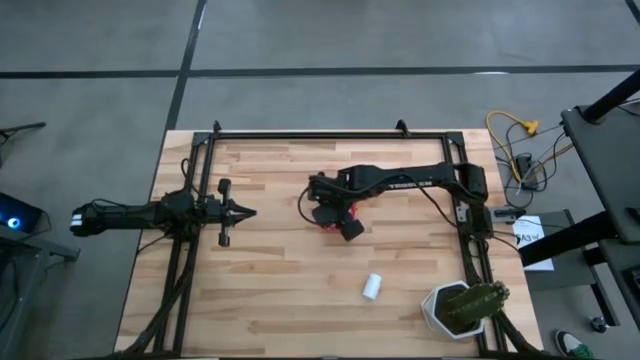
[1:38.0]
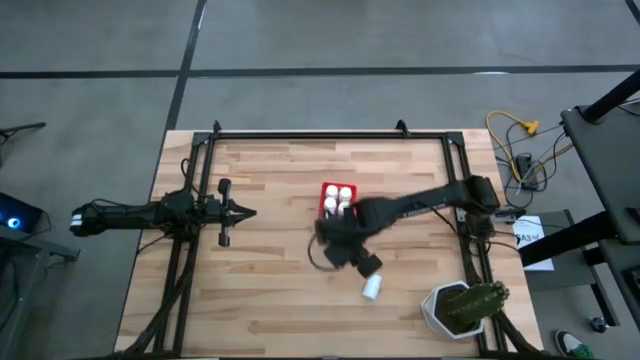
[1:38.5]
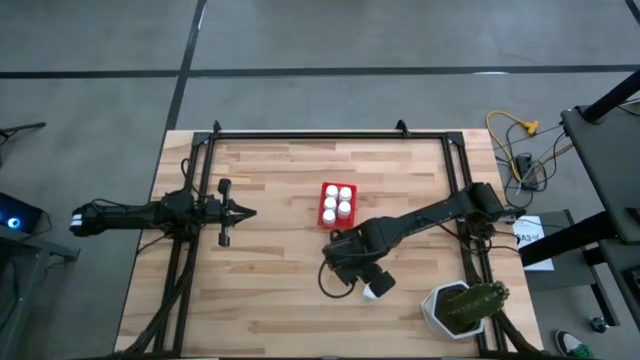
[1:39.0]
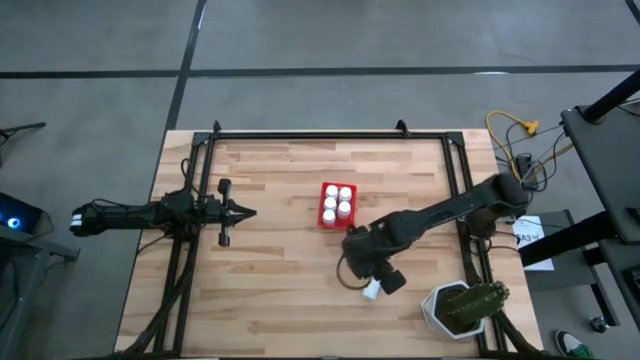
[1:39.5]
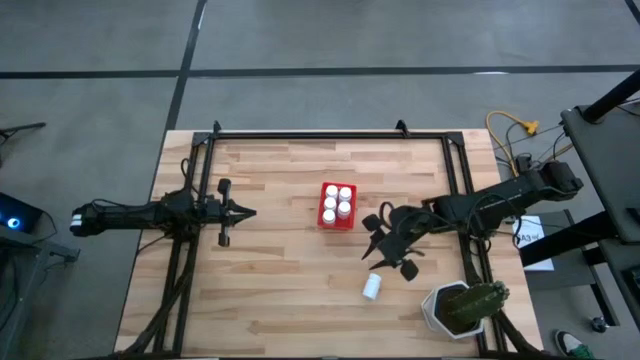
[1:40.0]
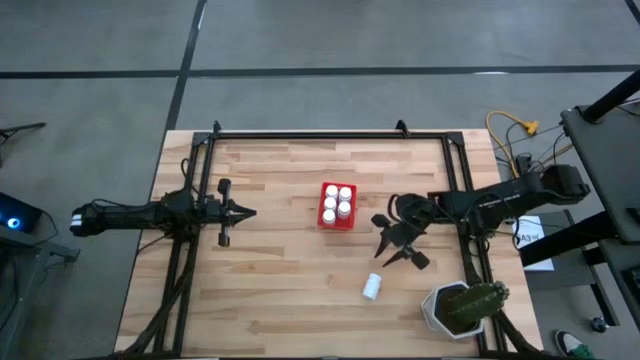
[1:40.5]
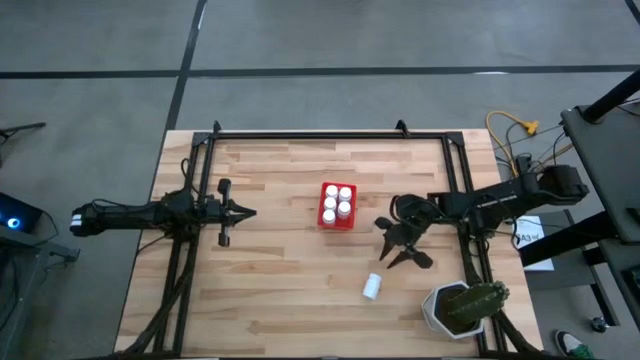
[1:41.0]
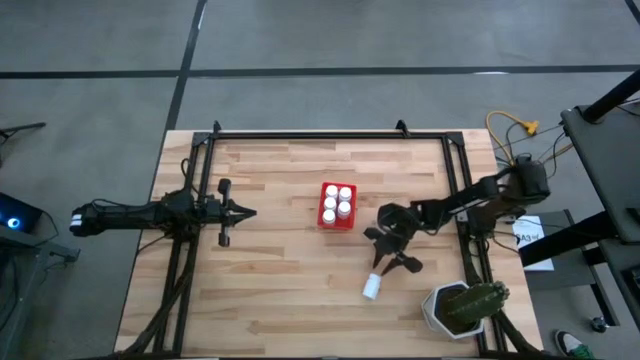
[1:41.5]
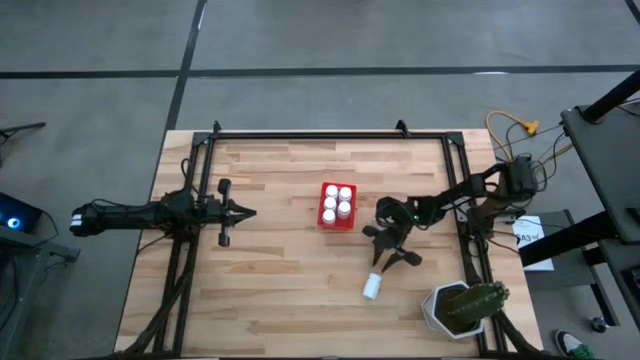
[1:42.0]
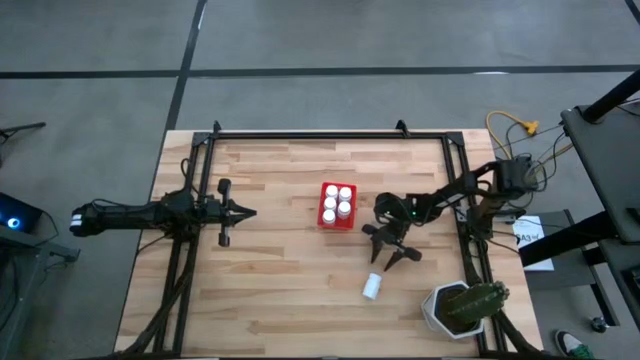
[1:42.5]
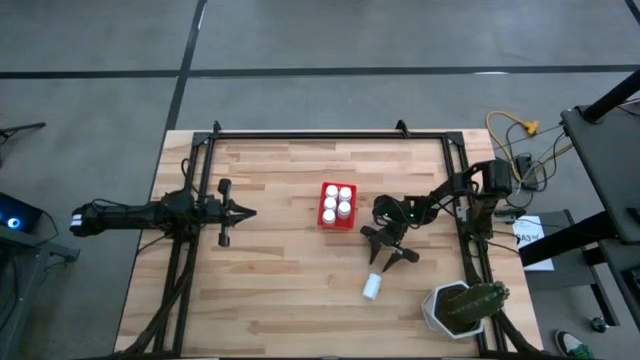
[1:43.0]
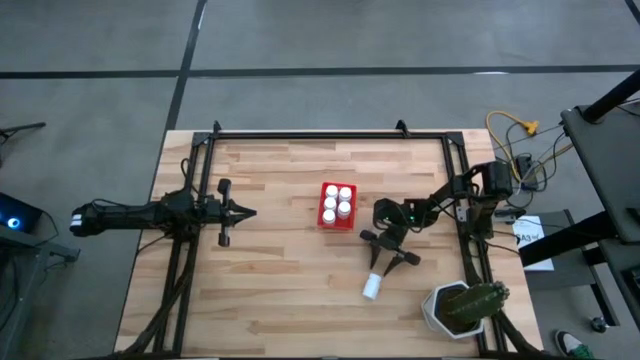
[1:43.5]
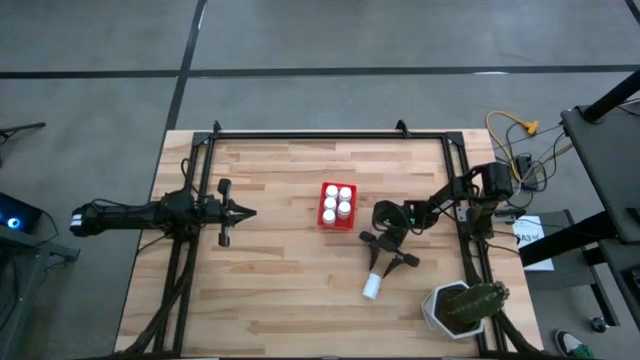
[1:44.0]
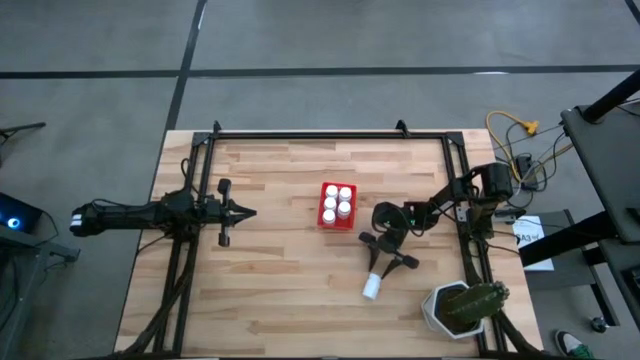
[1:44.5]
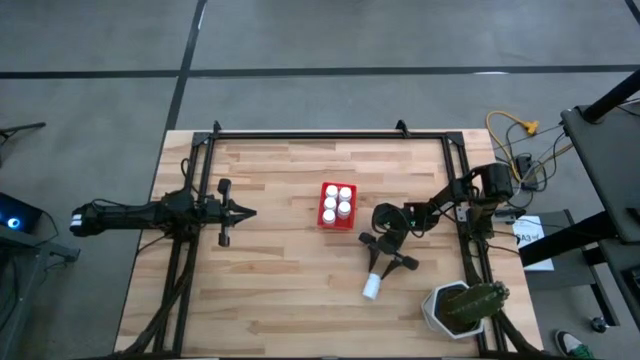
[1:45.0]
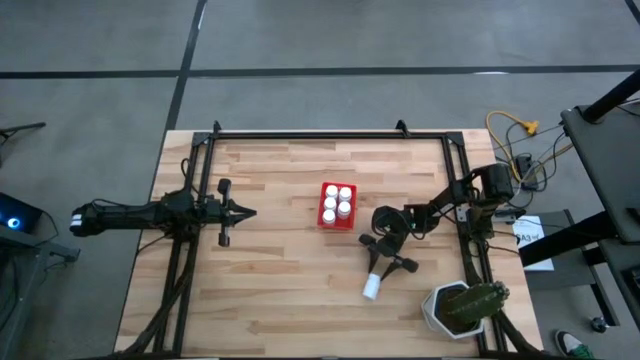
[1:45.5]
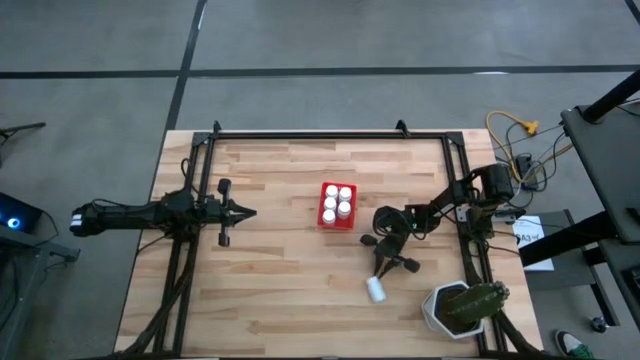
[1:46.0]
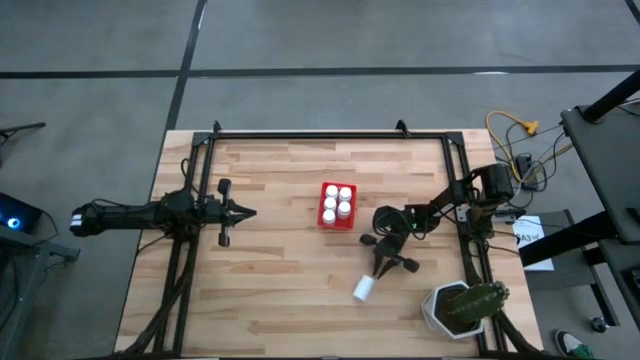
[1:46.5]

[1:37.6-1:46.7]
Task: Pick and place pill bottles into a basket
Put the white medicine bottle into the red bin

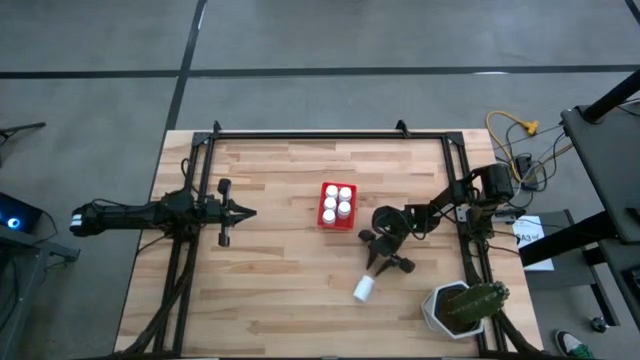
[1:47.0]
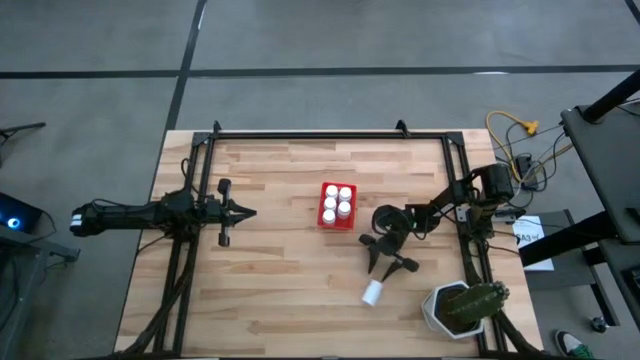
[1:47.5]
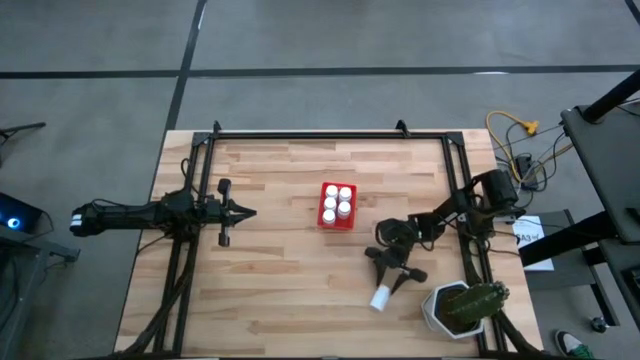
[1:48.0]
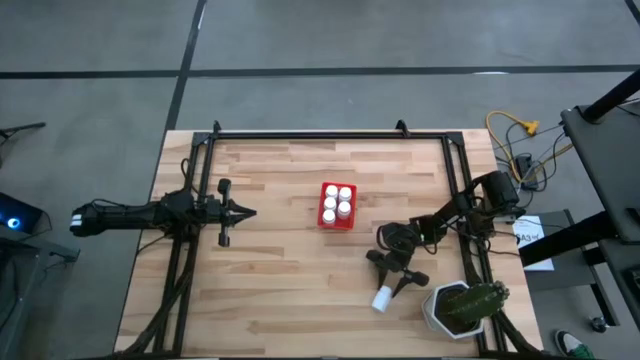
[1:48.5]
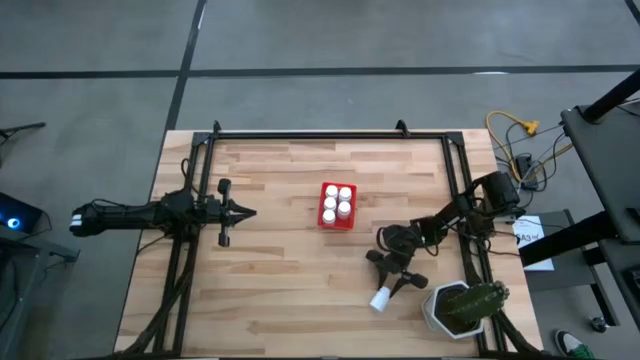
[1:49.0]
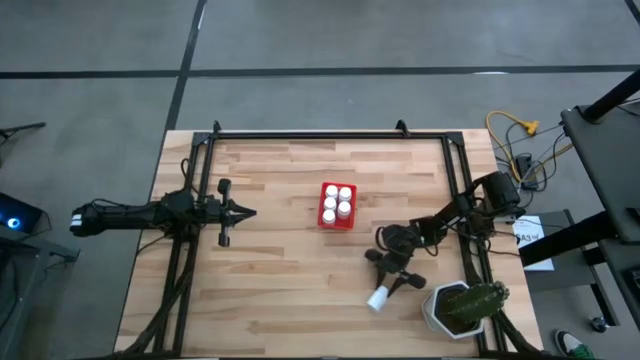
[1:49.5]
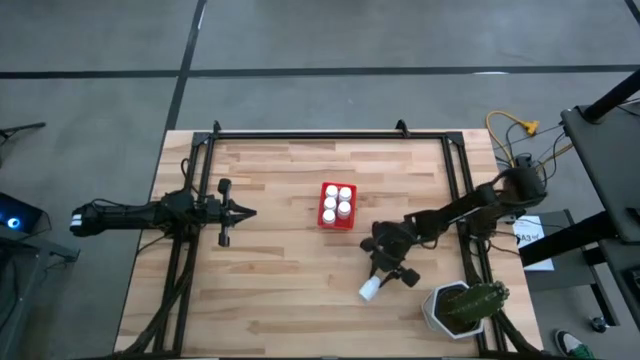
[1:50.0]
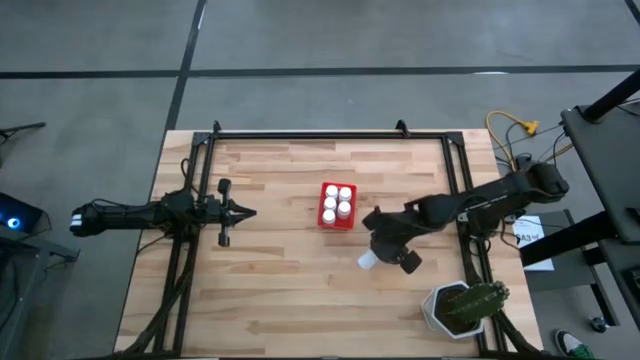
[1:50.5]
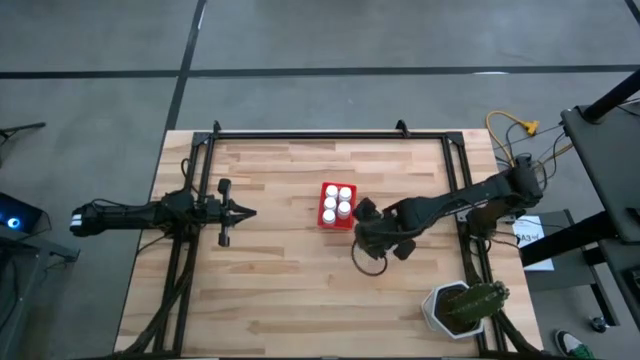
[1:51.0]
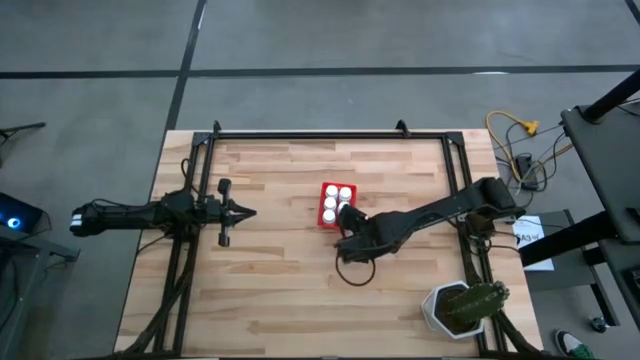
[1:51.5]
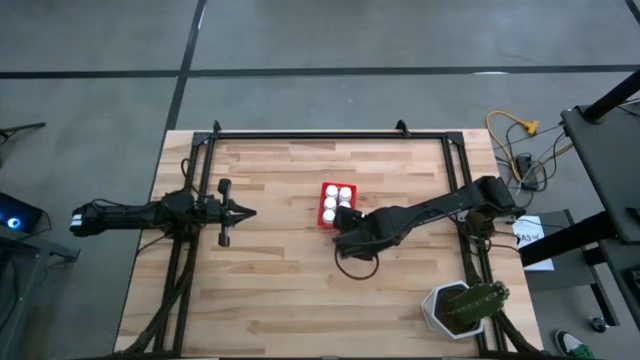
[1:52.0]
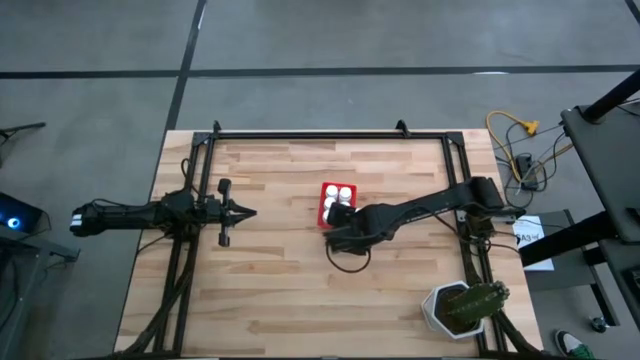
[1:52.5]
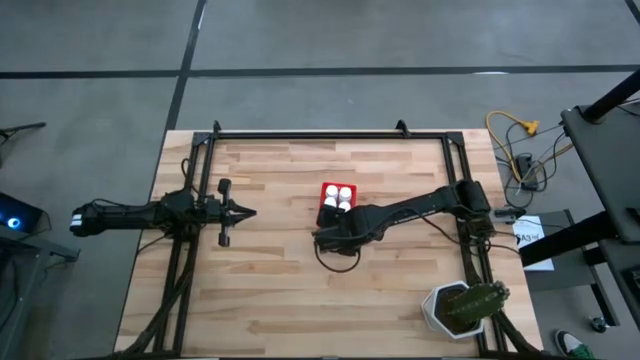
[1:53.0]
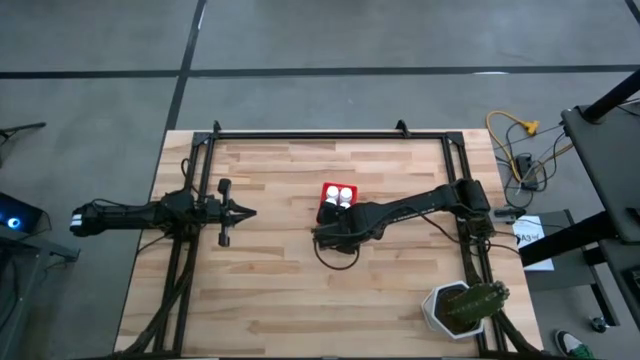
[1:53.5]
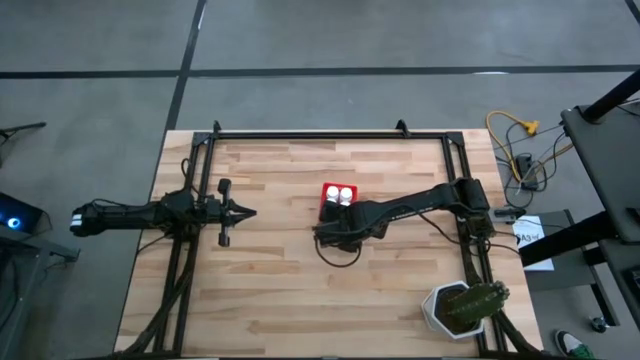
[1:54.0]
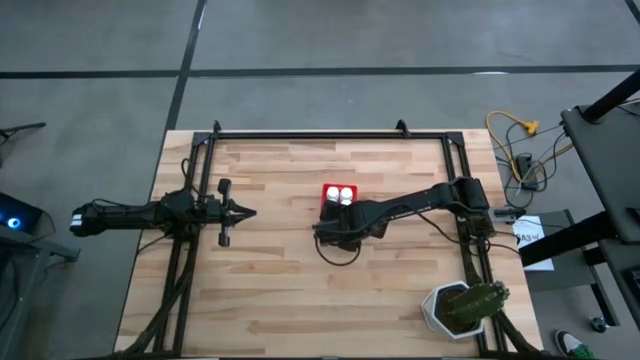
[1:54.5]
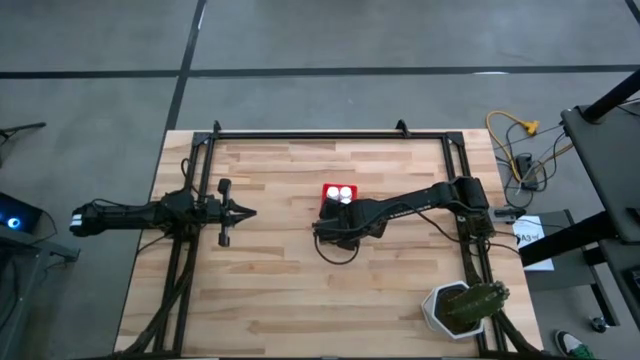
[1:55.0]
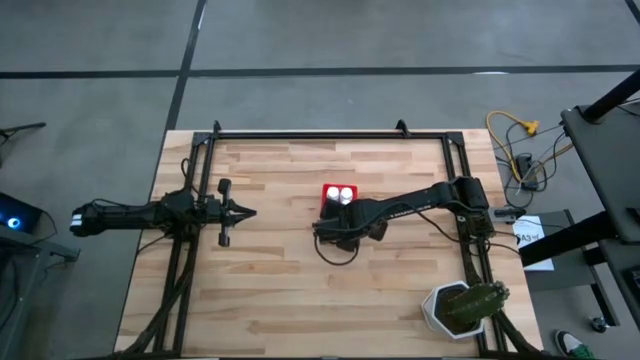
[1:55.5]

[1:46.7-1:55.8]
Put the white medicine bottle into the red bin

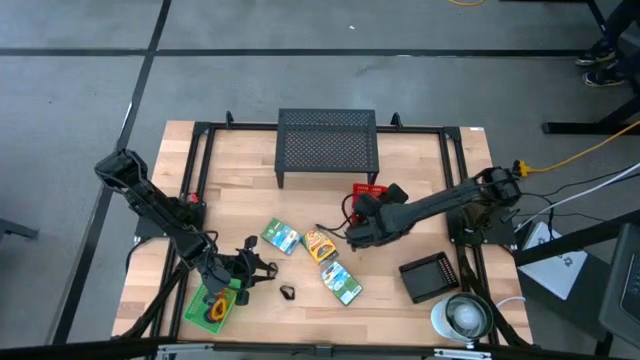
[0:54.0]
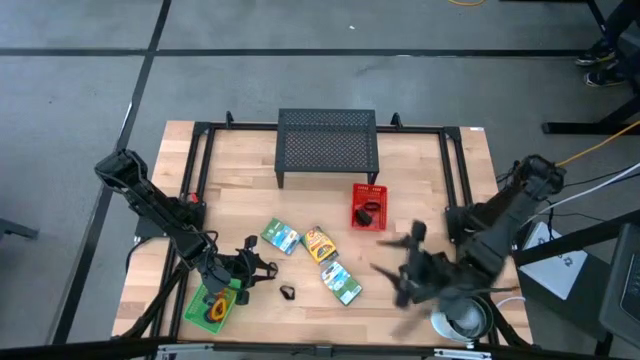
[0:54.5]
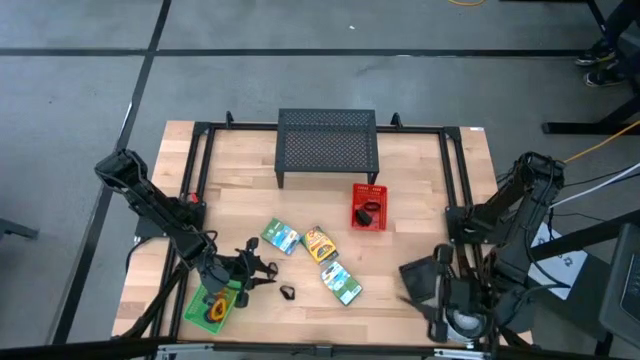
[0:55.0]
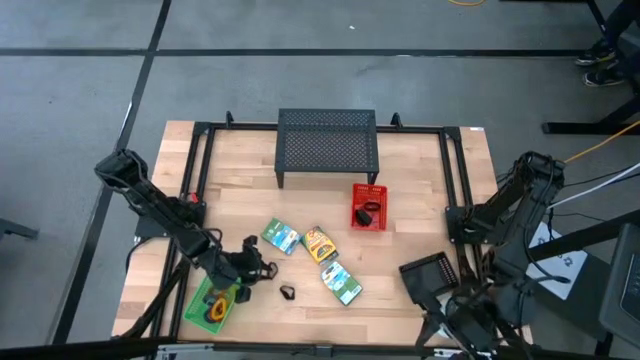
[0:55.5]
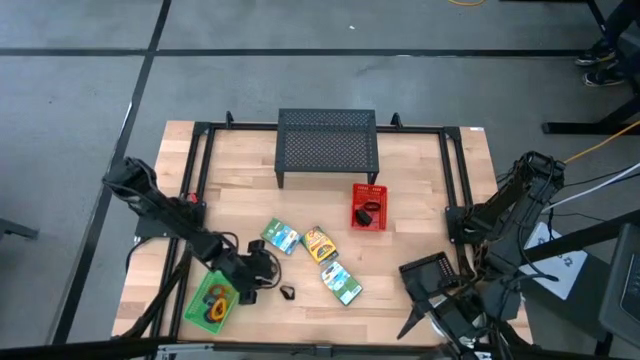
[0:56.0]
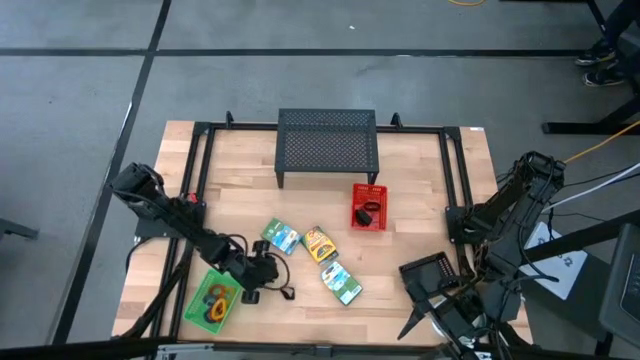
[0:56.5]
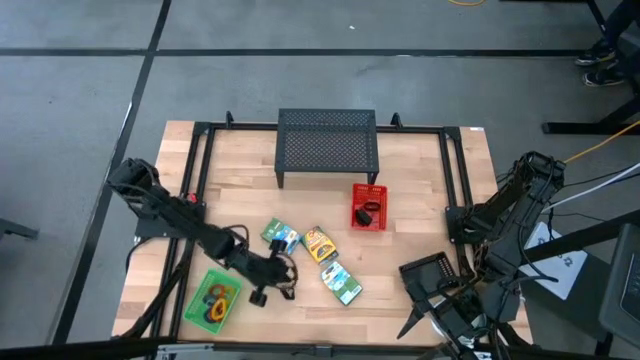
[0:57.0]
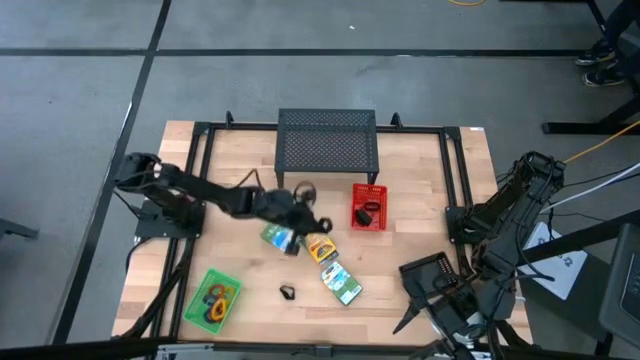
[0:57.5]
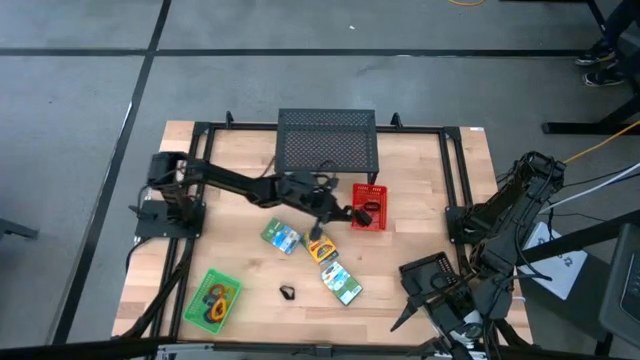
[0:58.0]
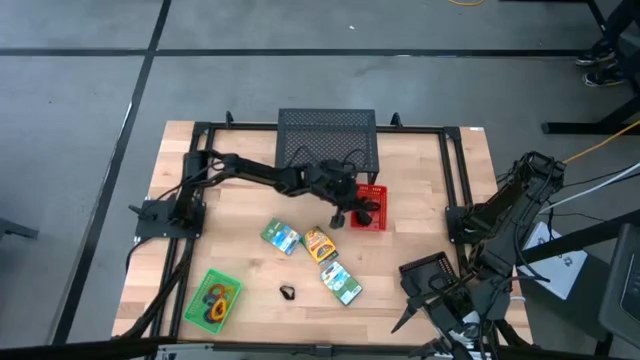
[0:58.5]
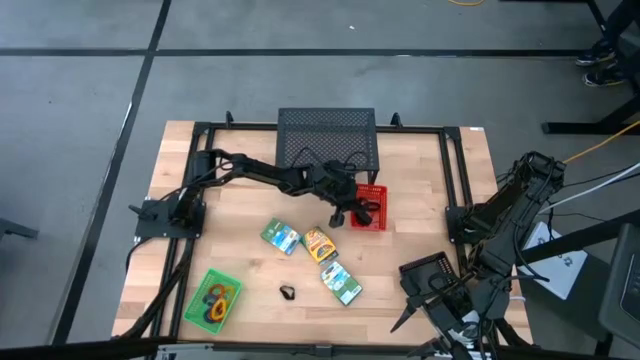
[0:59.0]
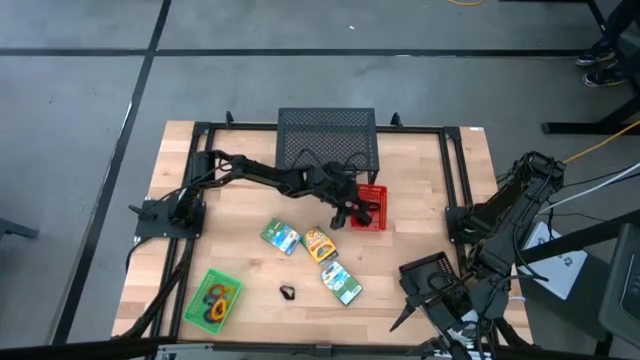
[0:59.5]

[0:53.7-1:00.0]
Task: Pick & Place Office Desk Supplies
Put the black rubberband into the red bin
